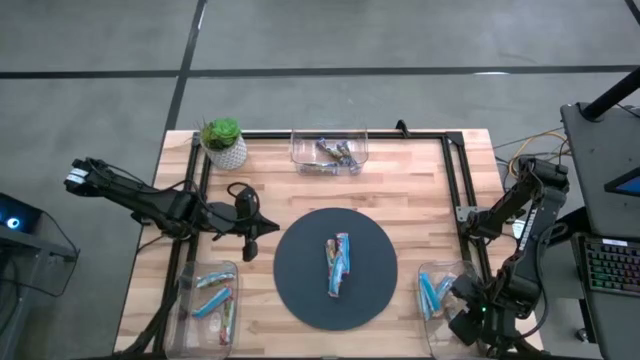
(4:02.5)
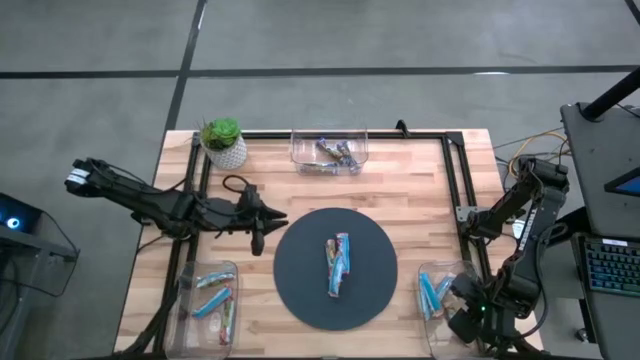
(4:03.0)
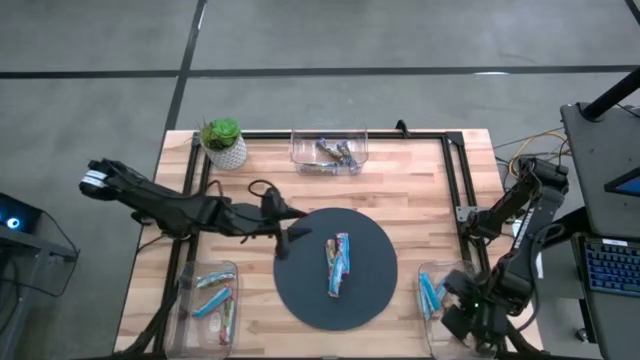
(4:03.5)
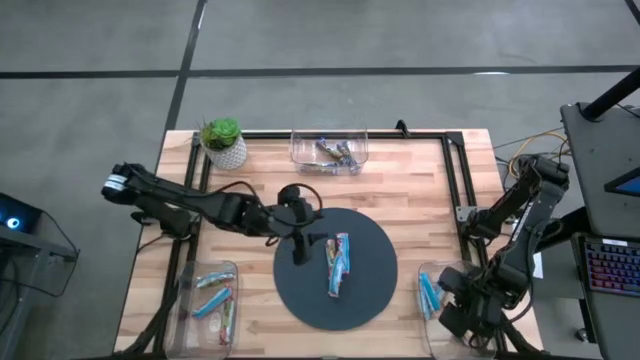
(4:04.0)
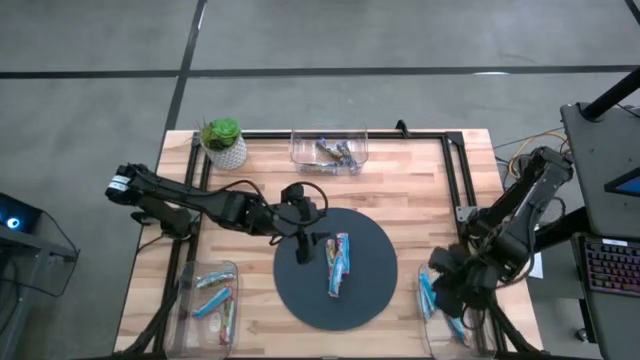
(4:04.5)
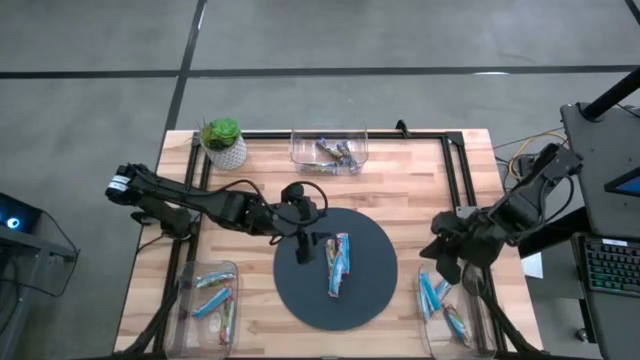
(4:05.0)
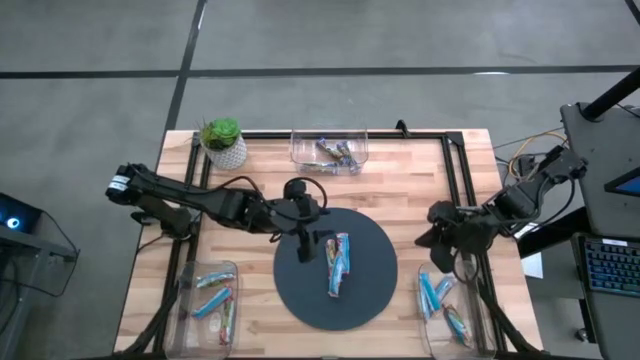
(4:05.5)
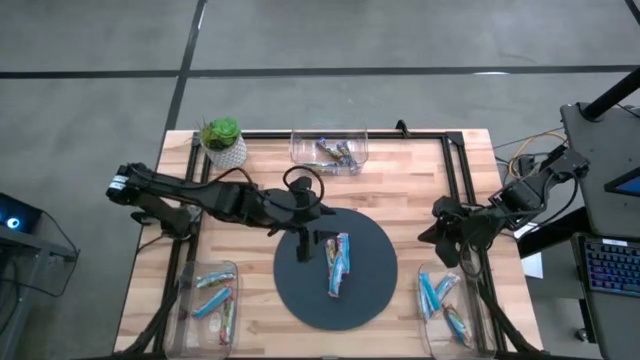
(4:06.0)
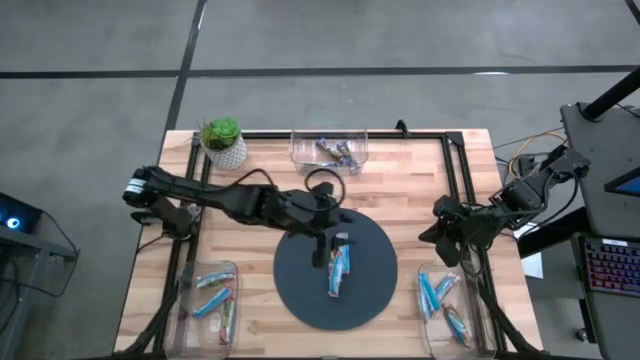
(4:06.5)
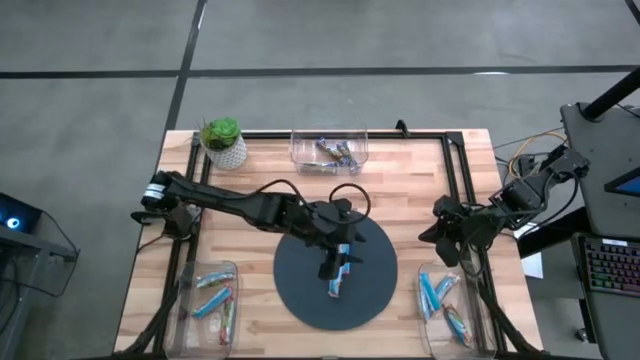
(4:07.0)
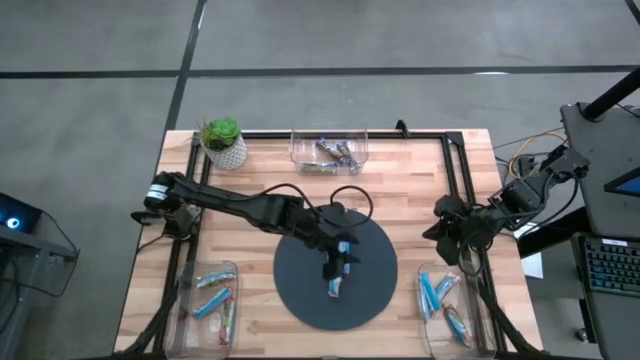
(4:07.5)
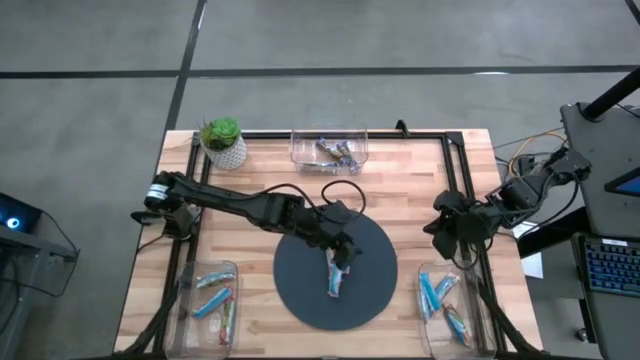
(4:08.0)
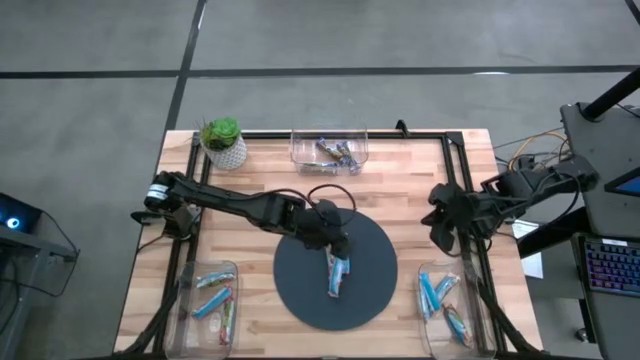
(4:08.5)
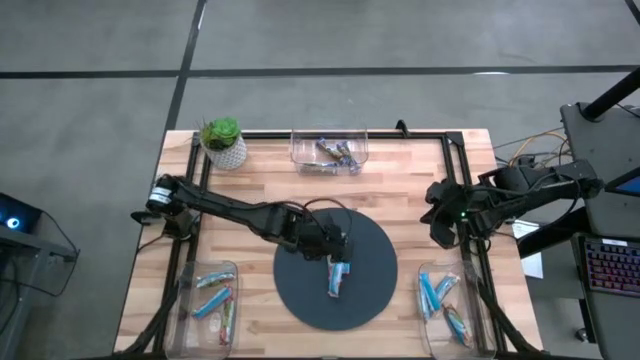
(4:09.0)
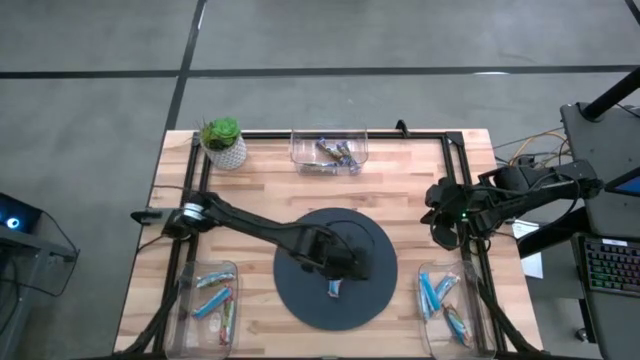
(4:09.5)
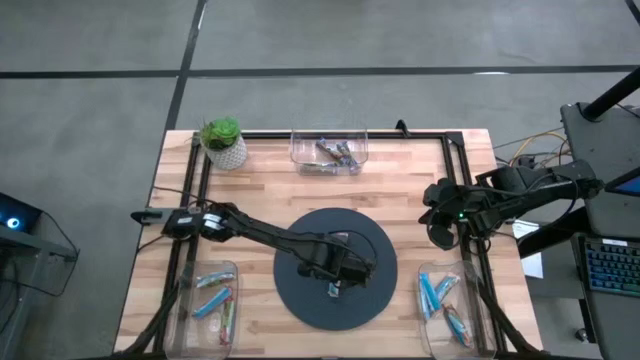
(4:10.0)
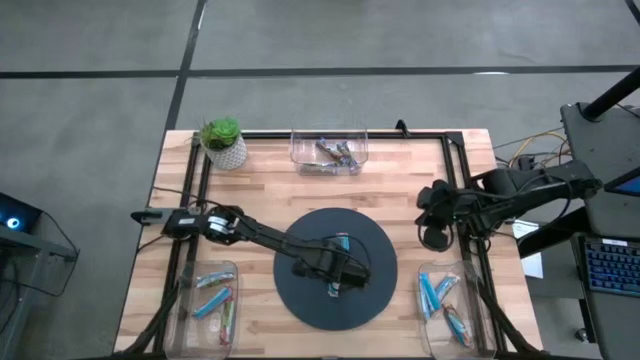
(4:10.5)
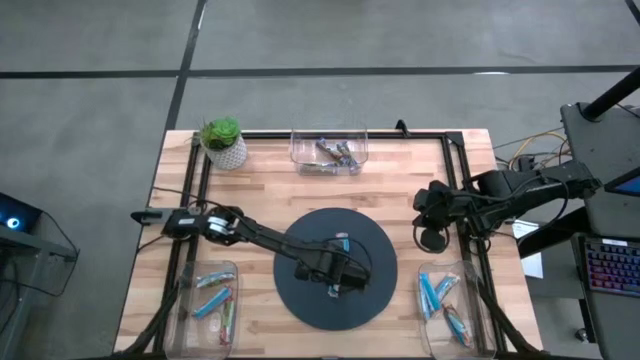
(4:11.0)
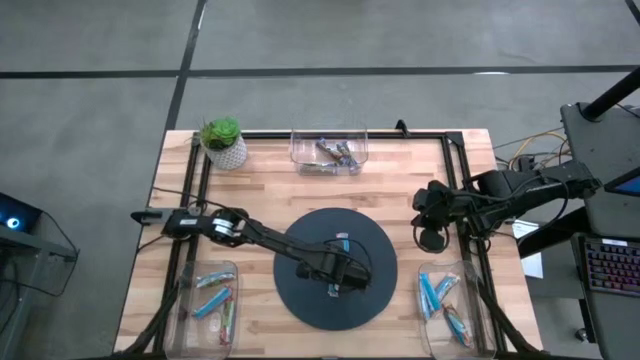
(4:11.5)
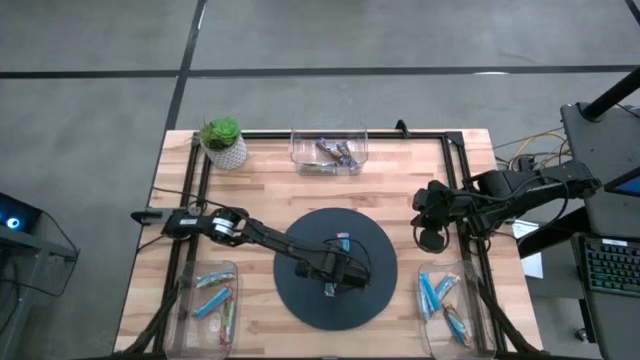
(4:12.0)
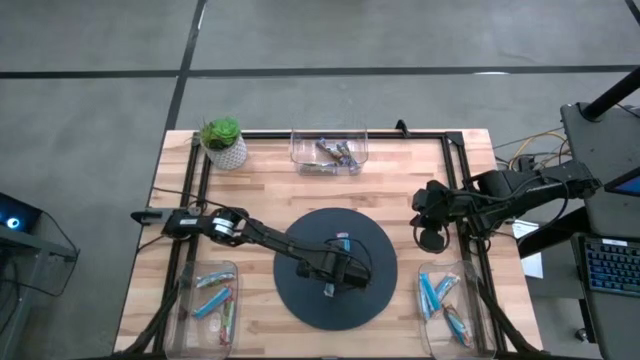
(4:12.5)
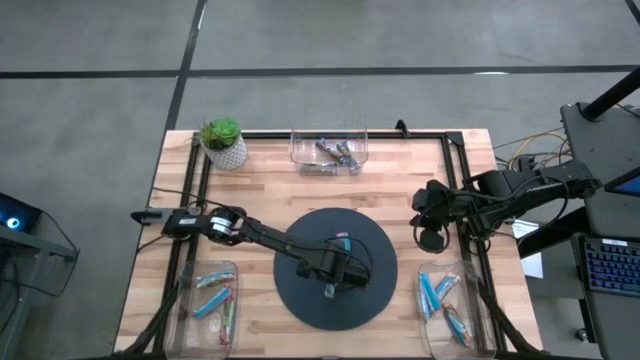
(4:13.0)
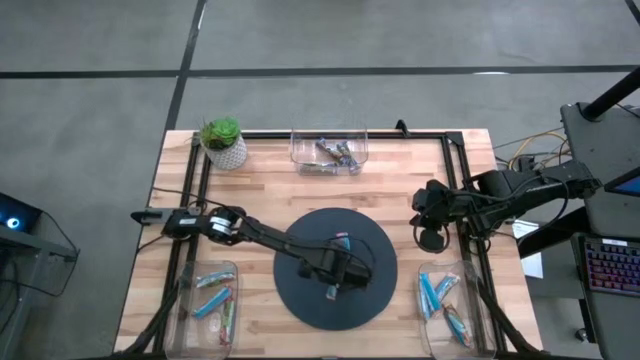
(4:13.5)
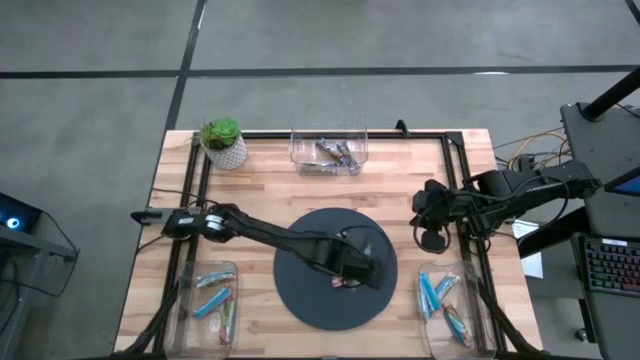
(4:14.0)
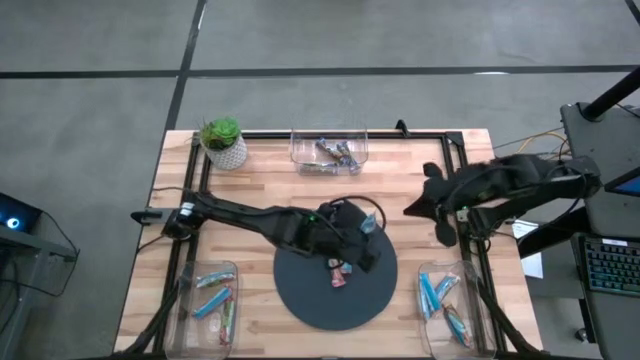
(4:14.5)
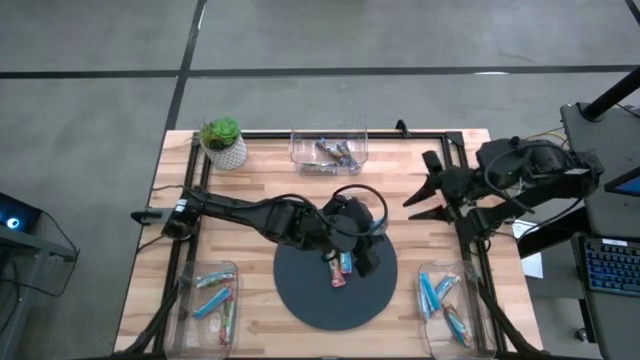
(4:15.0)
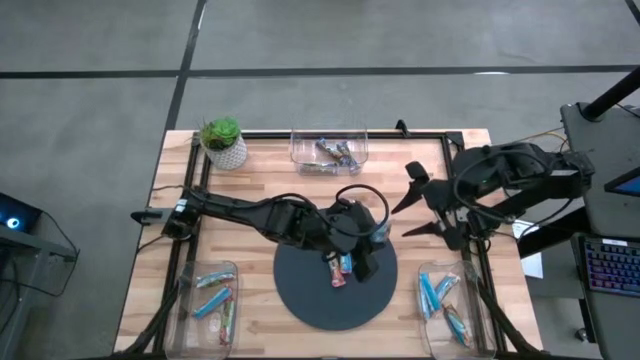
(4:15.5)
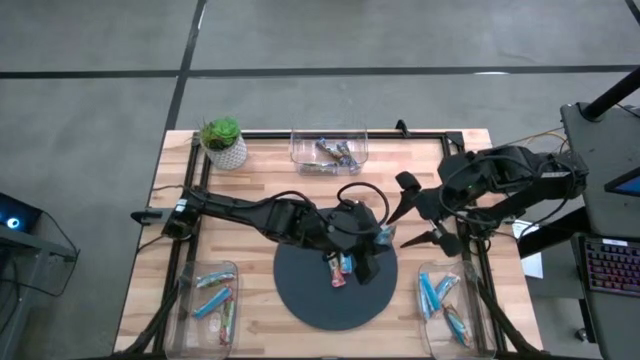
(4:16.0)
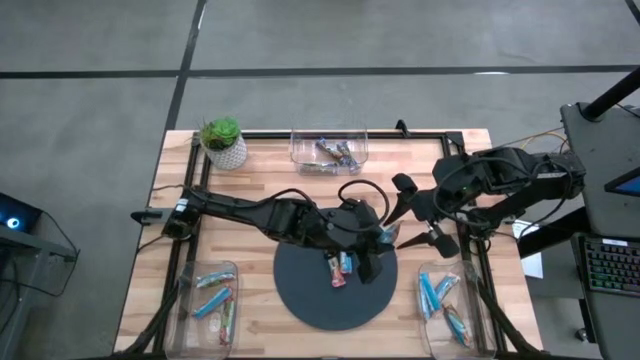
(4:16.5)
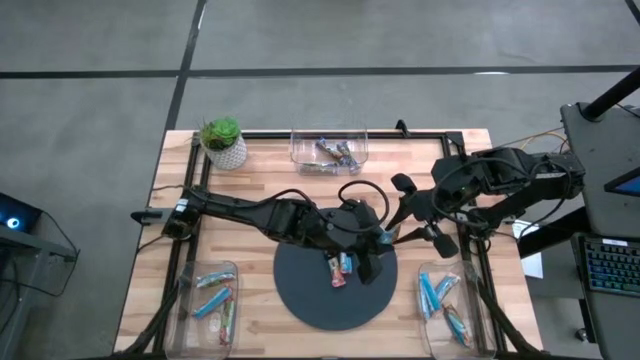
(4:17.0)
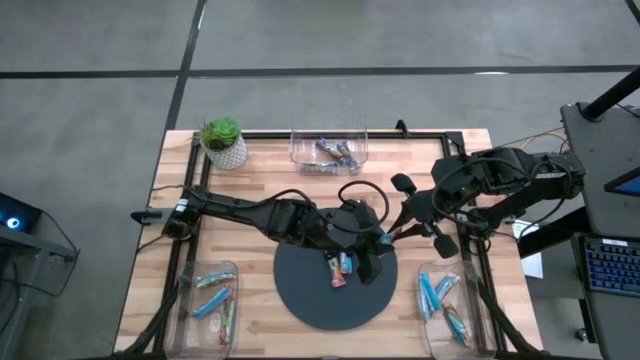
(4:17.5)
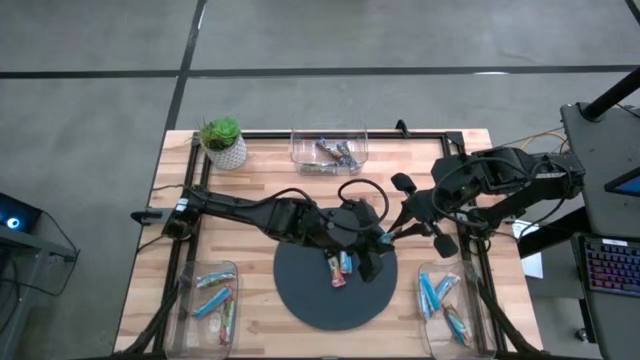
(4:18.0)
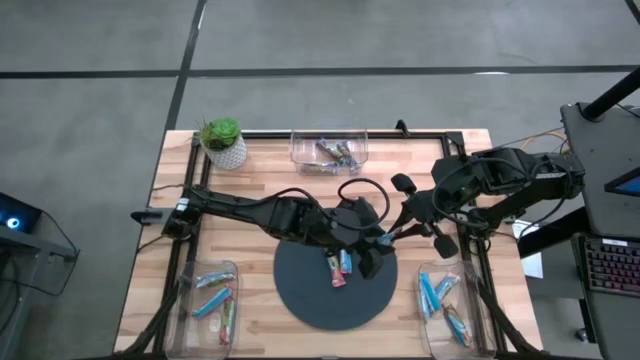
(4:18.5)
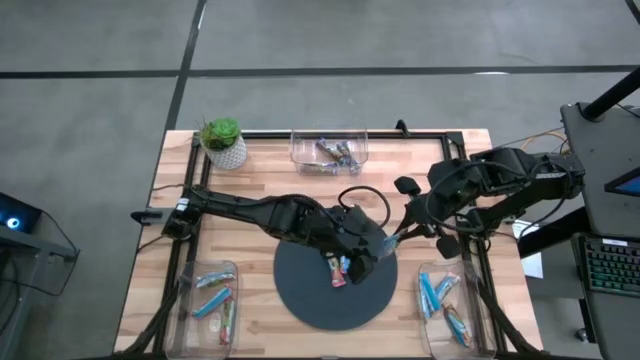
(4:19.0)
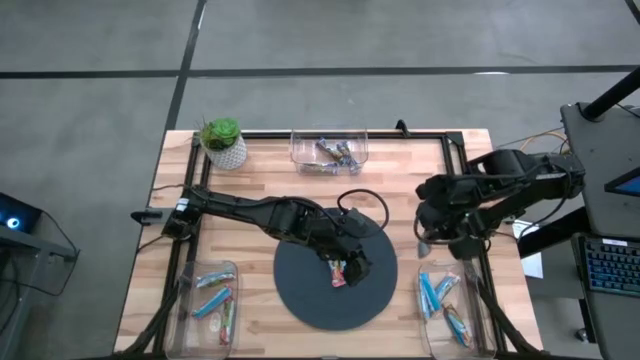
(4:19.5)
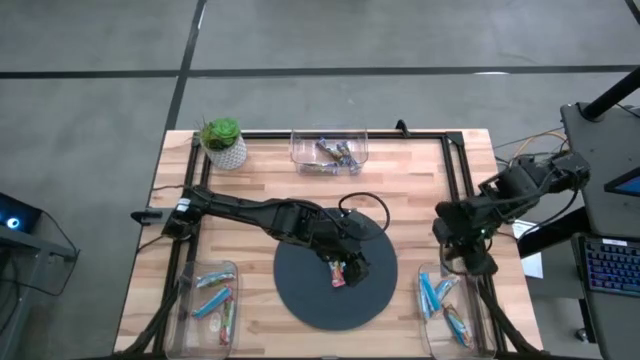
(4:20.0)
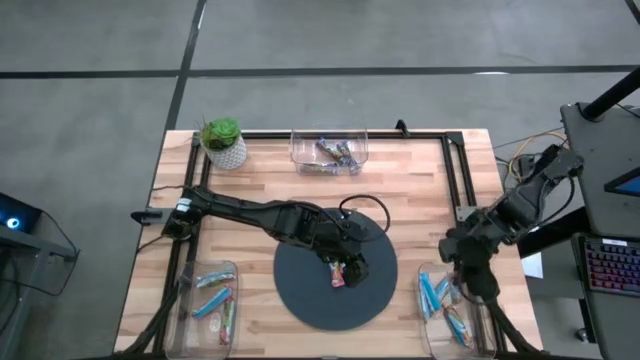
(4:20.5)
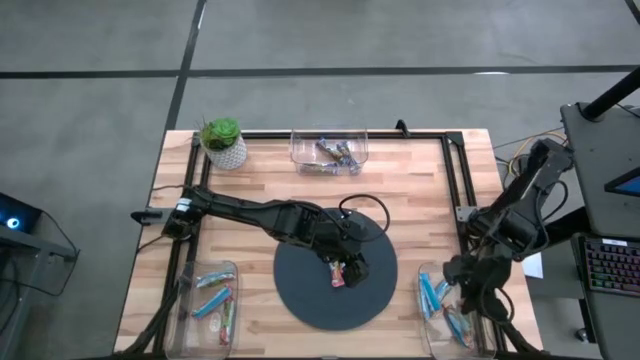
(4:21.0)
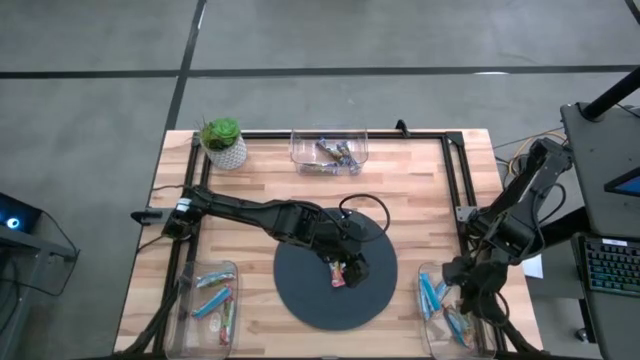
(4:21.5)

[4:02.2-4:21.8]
Task: Pick and place Granola Bars by type
Put the yellow granola bar into the bottom right transparent bin

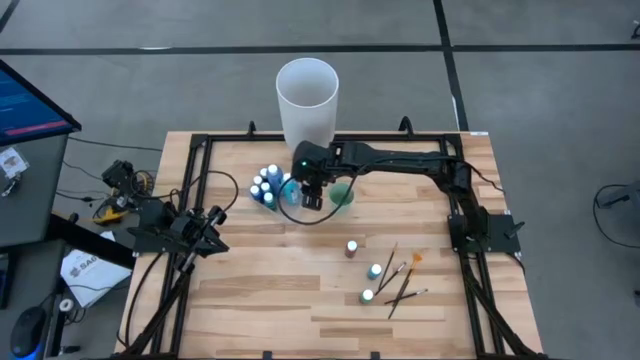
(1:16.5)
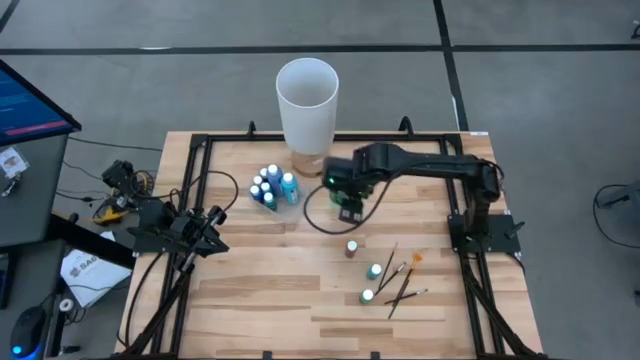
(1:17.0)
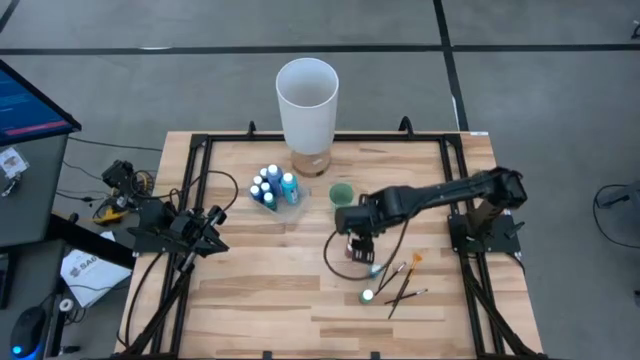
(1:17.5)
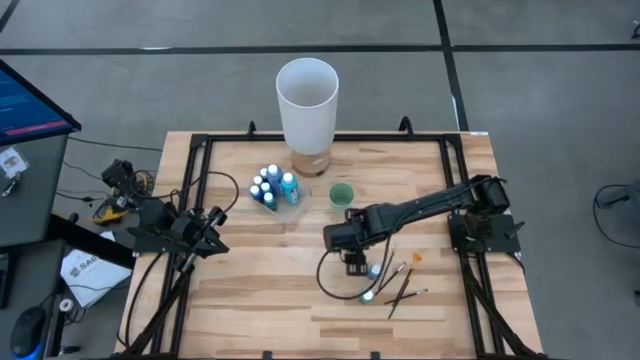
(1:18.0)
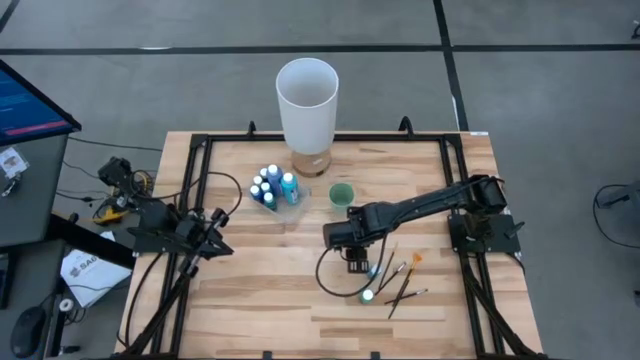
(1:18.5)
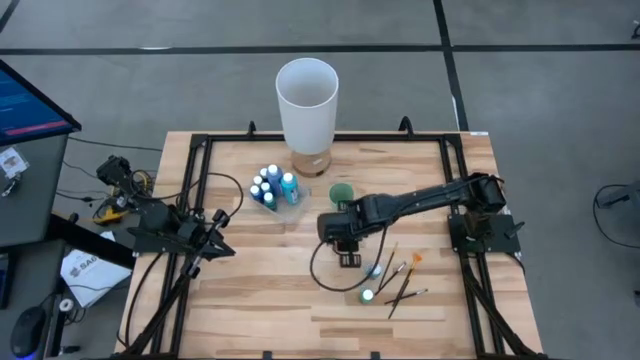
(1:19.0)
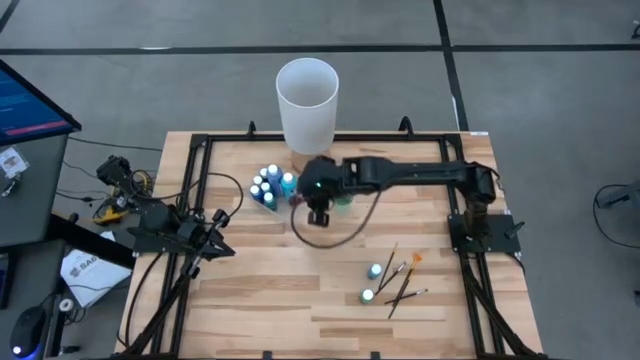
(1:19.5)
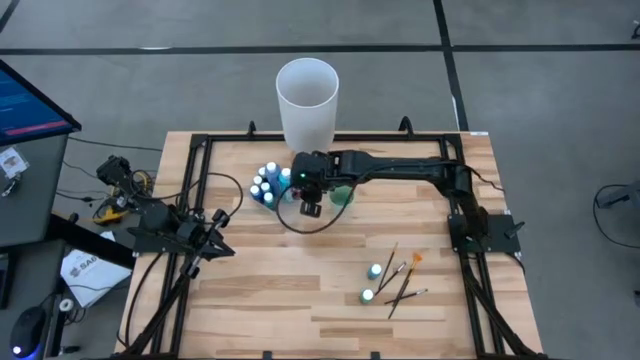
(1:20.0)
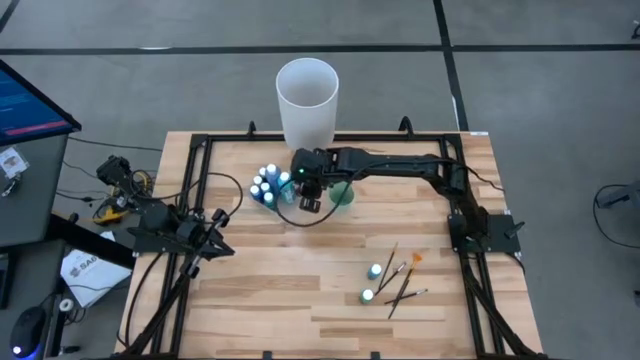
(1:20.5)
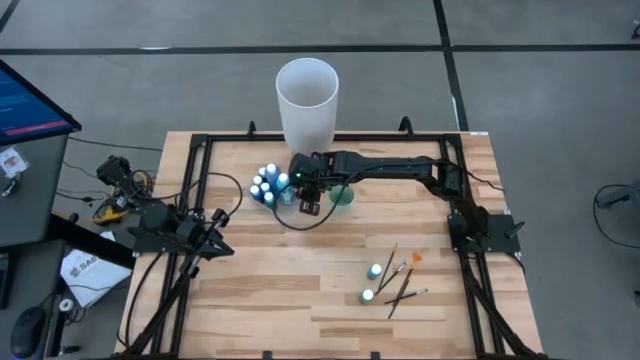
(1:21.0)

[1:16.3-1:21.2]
Task: Pick & Place Paint Supplies
Put the red paint bottle into the transparent bin
